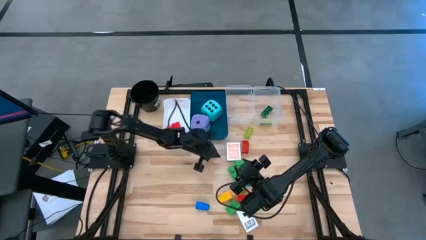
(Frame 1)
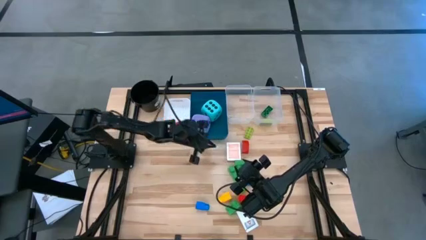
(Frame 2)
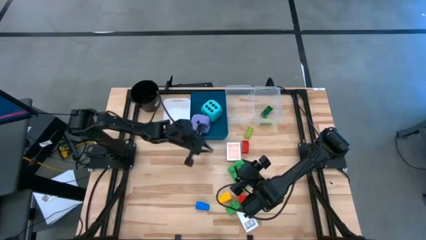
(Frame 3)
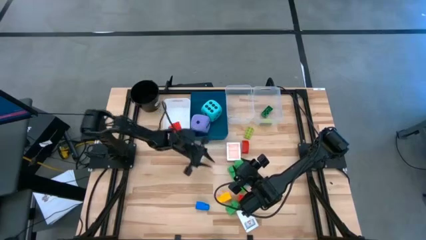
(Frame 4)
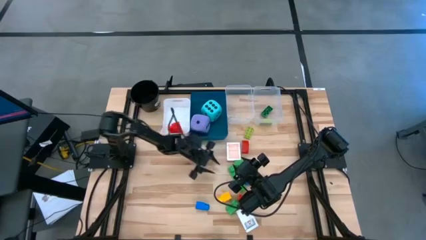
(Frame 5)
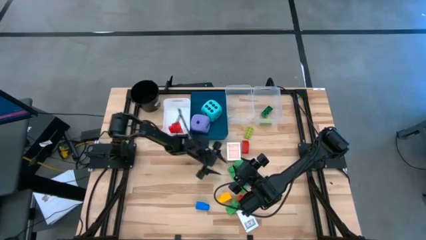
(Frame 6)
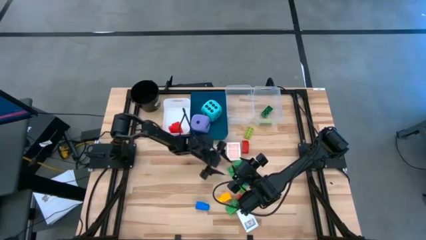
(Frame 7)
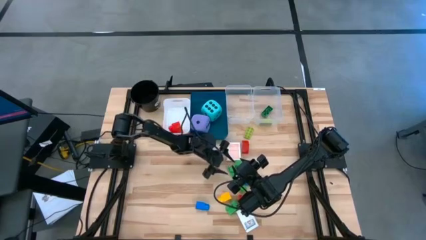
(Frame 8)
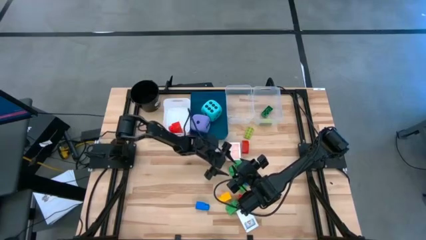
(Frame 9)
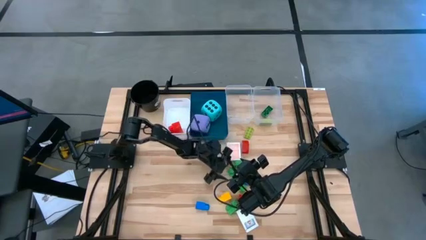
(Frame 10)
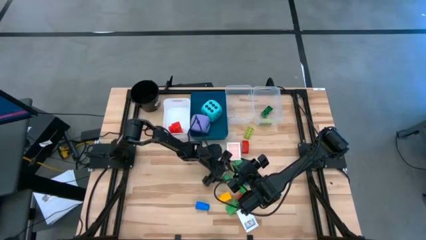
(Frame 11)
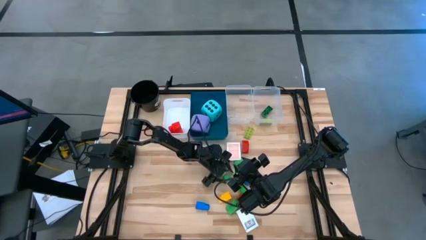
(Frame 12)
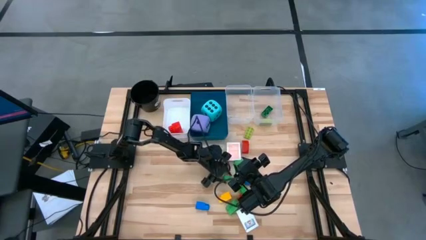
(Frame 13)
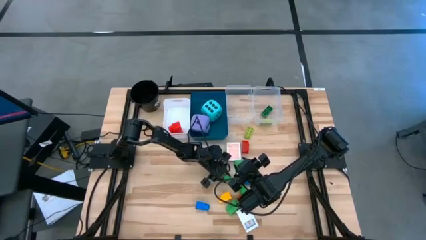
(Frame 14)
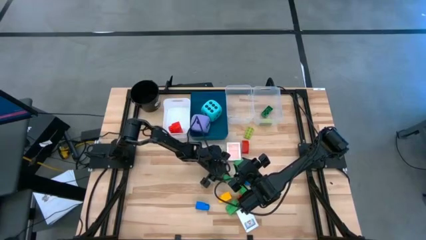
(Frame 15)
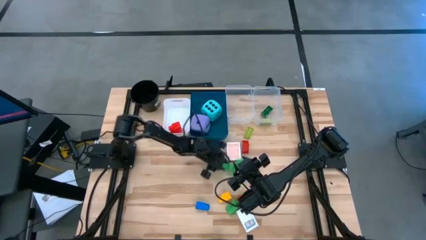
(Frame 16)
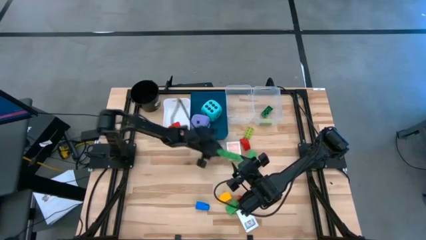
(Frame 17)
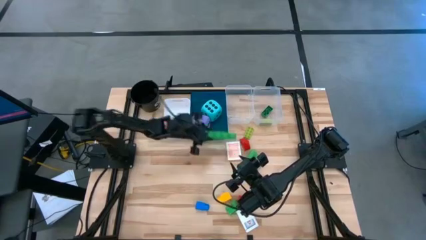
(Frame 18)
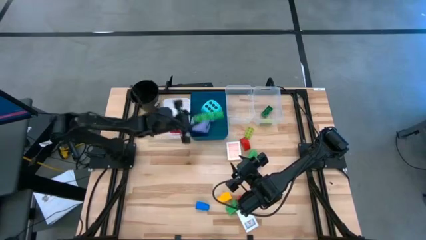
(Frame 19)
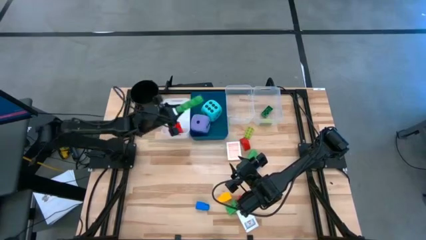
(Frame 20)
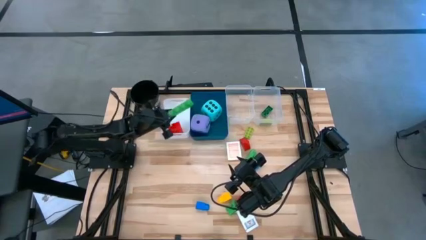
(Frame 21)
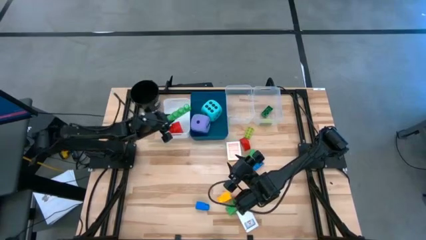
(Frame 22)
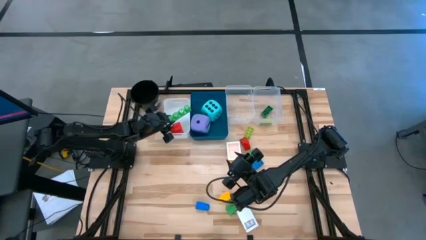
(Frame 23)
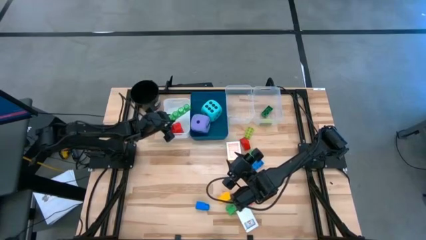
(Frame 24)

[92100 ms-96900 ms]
Task: Pick & Place Toys
Put the top left large green game piece into the white bin

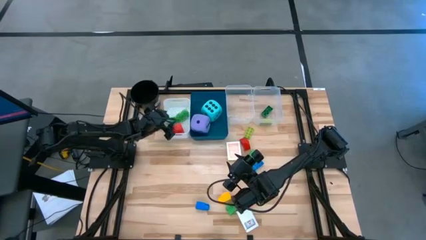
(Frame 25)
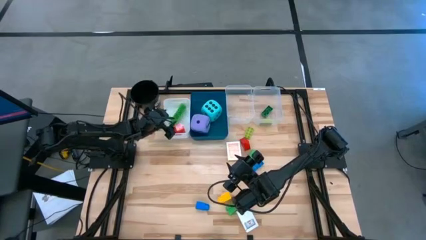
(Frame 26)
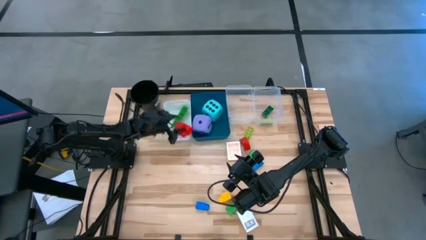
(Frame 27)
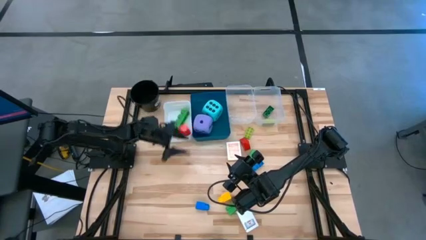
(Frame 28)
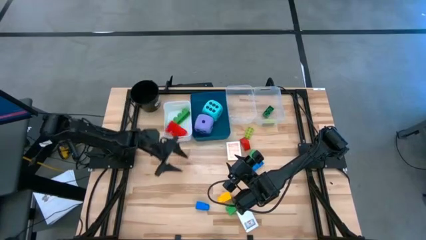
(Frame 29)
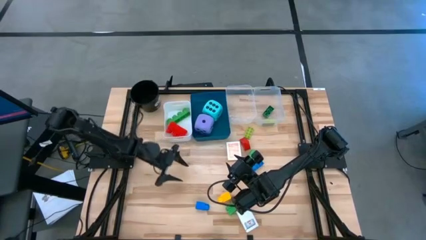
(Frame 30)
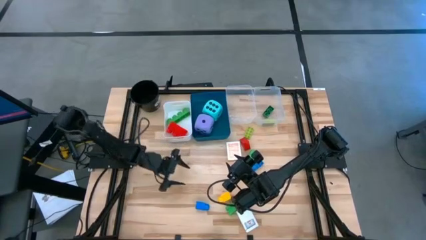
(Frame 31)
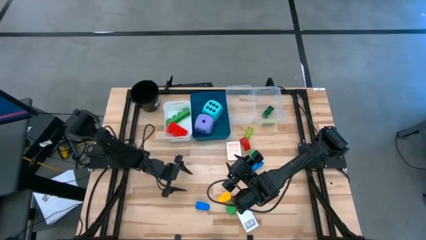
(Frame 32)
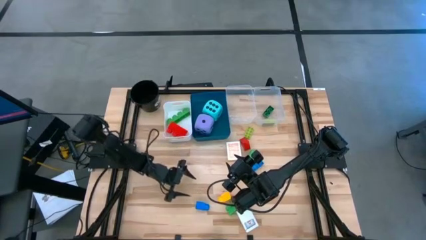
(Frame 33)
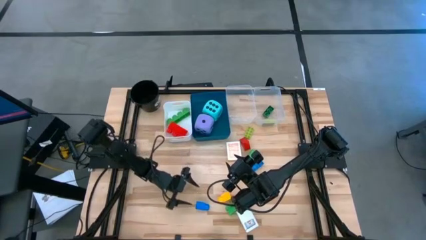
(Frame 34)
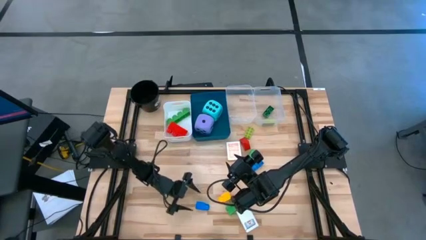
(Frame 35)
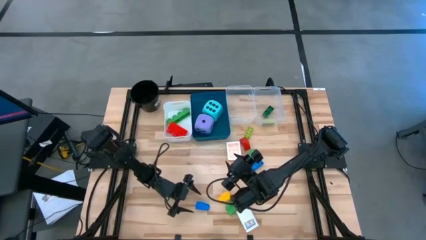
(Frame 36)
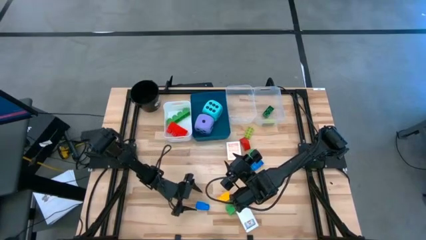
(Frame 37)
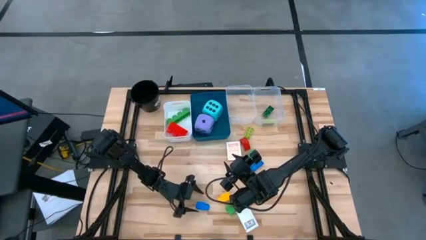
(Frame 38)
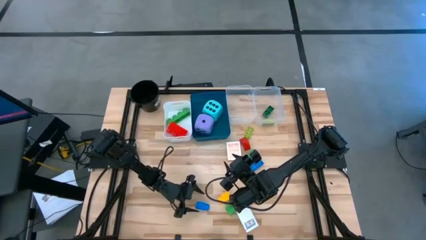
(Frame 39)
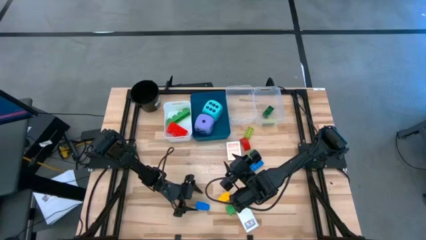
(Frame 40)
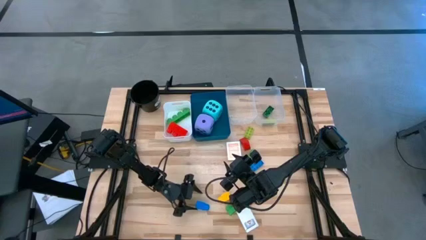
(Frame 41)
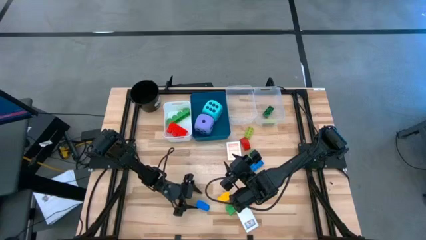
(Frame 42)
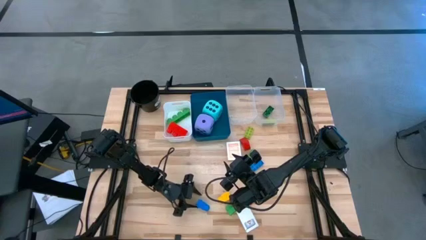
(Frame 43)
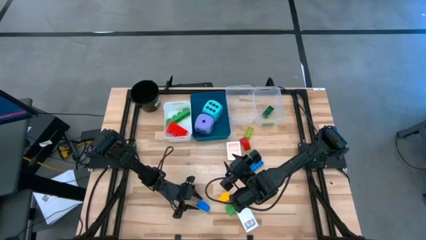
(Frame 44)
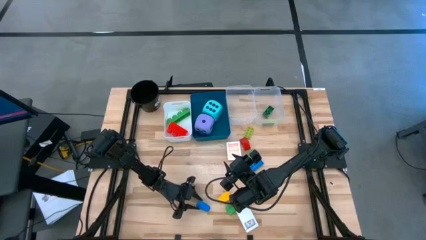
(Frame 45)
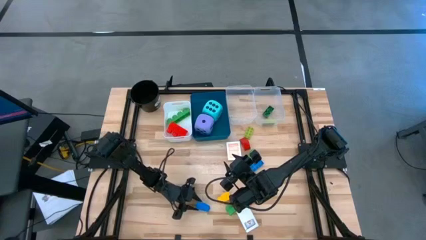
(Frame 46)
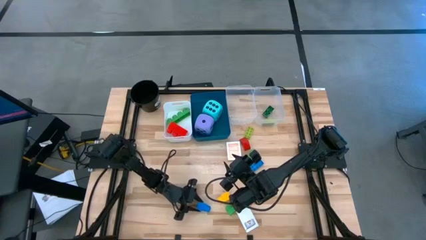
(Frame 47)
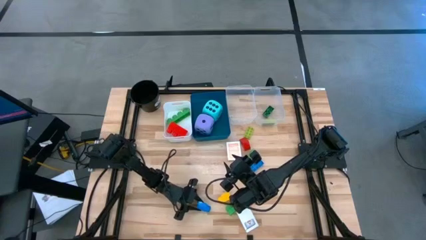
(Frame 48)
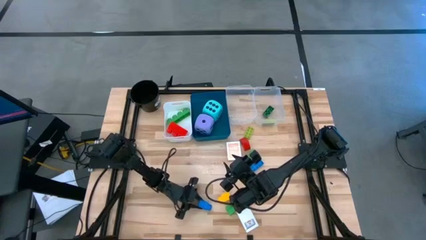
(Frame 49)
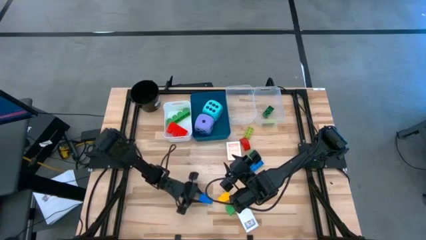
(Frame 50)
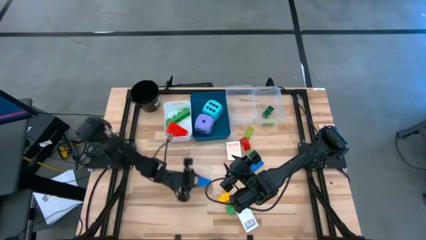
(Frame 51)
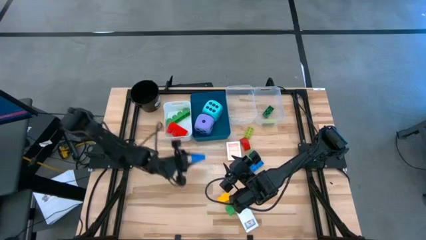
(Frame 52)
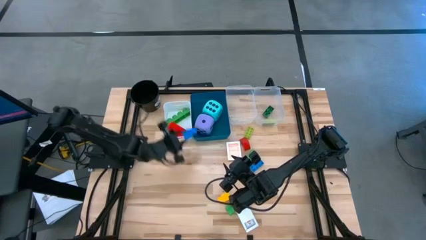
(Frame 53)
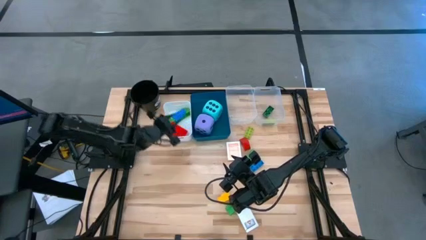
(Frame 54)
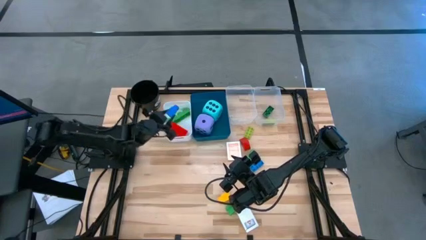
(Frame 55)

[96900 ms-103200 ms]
Put the large blue game piece into the white bin

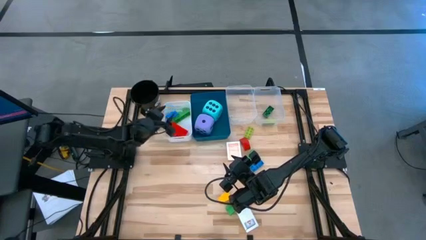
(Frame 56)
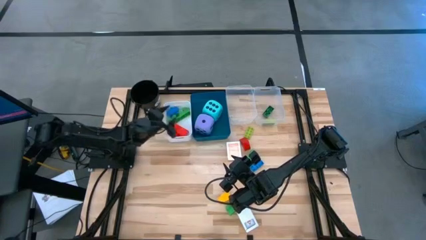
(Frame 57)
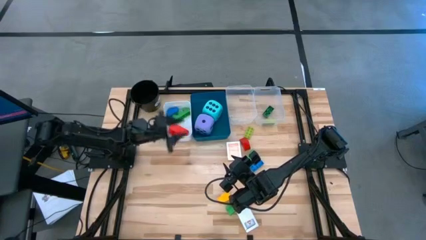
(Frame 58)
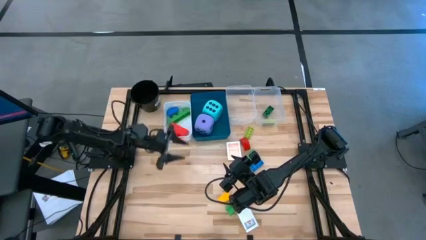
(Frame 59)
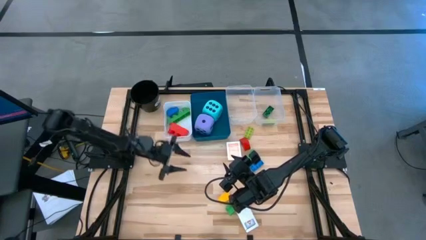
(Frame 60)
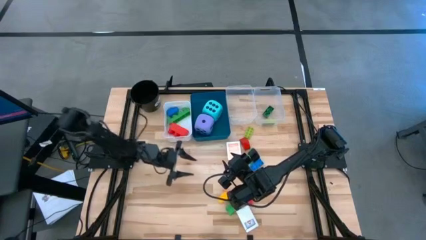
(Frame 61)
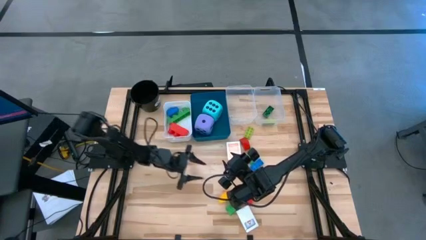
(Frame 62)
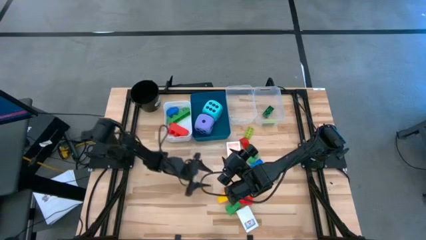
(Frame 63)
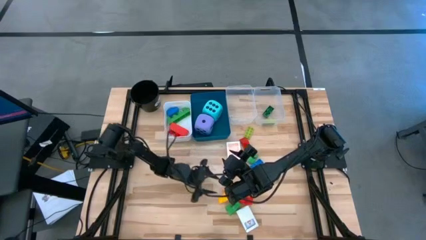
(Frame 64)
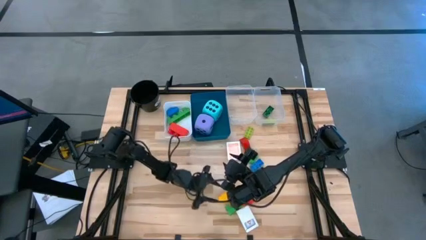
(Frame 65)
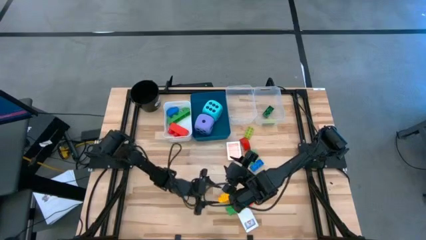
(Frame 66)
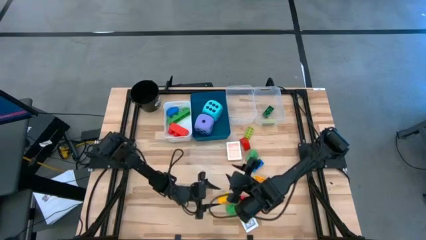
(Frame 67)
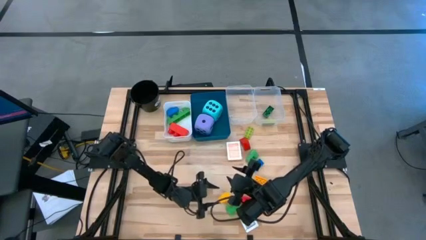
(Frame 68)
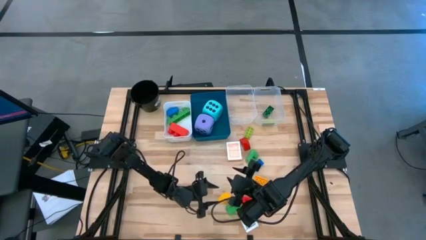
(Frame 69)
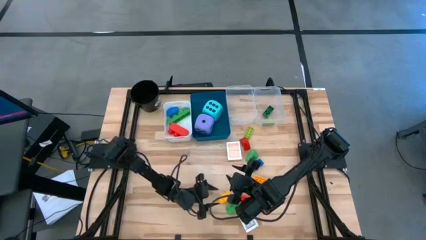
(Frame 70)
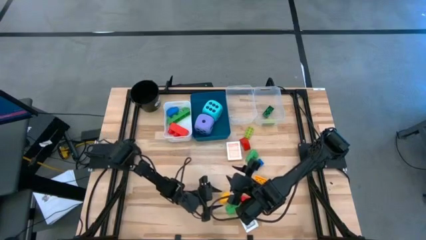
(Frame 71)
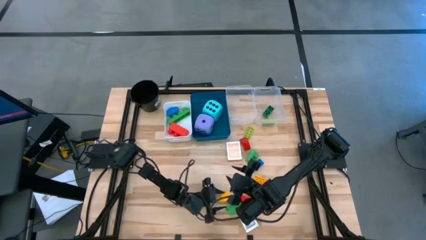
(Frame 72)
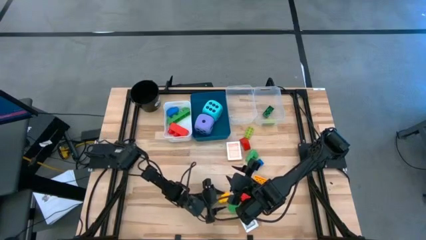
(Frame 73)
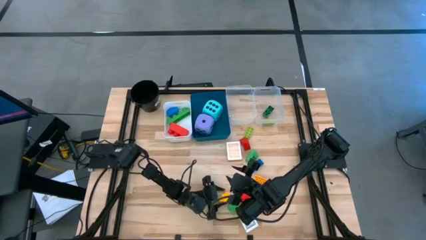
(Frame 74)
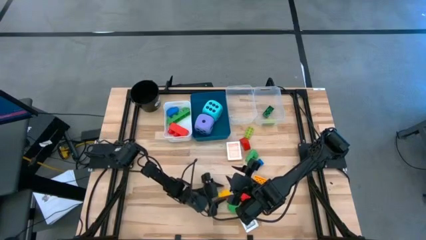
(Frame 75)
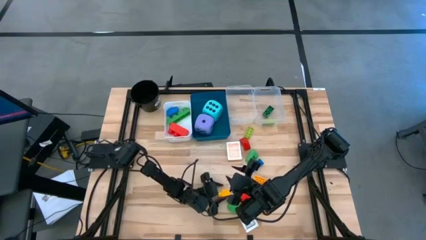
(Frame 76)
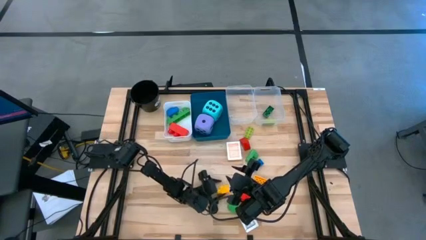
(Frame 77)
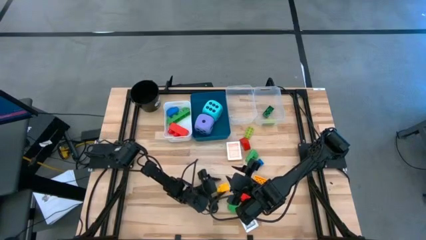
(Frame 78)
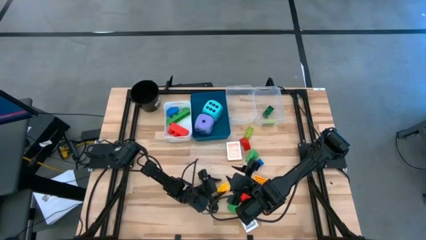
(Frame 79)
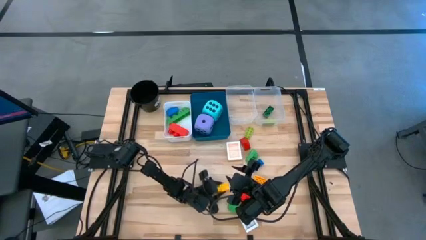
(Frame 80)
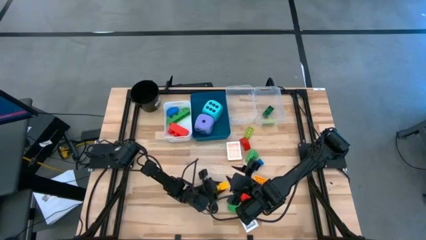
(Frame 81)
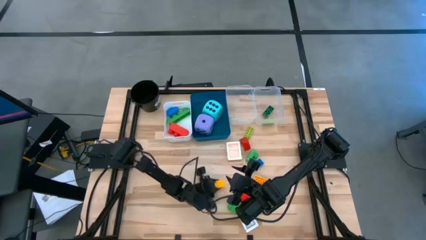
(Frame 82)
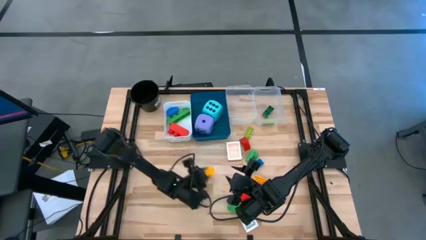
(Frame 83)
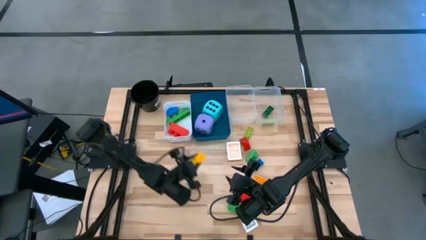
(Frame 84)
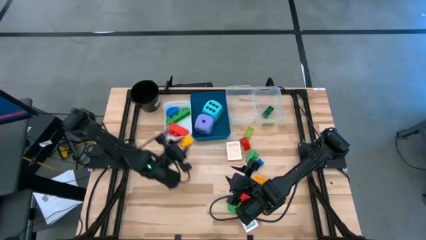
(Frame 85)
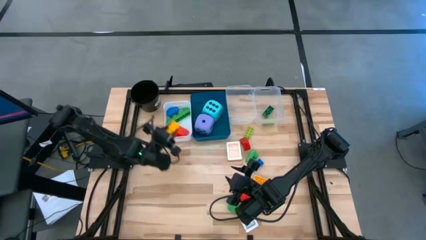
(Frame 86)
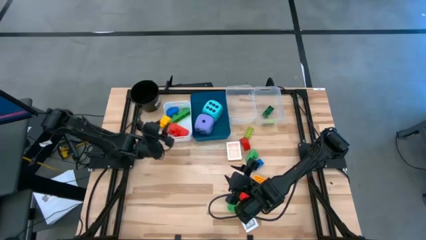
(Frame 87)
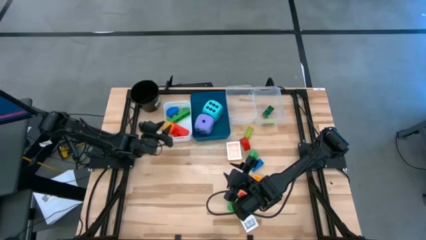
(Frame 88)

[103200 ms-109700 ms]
Put the large yellow game piece into the white bin
